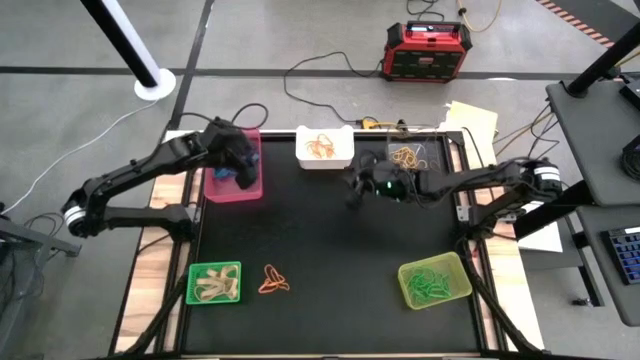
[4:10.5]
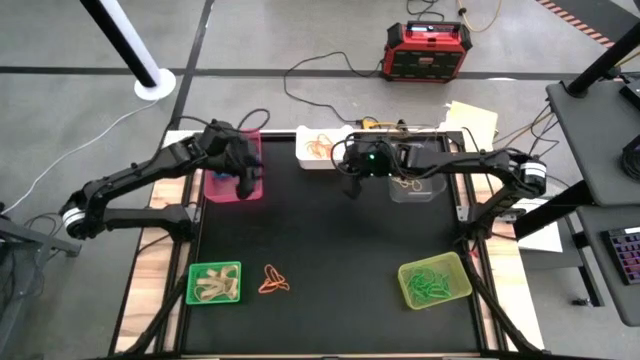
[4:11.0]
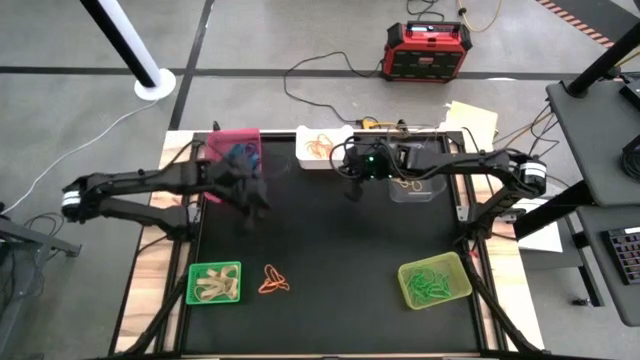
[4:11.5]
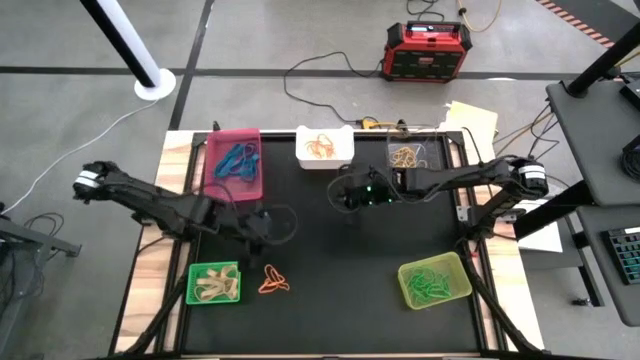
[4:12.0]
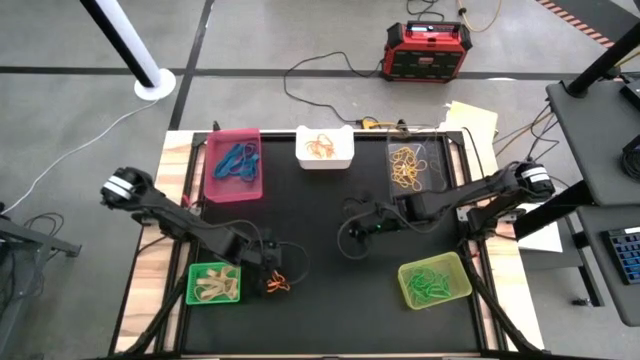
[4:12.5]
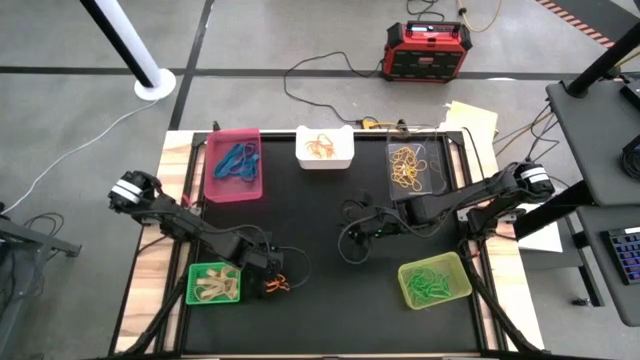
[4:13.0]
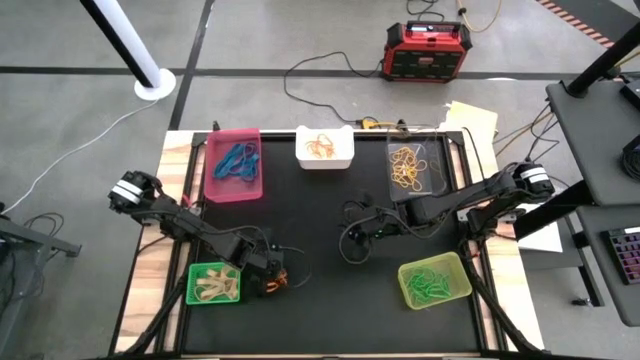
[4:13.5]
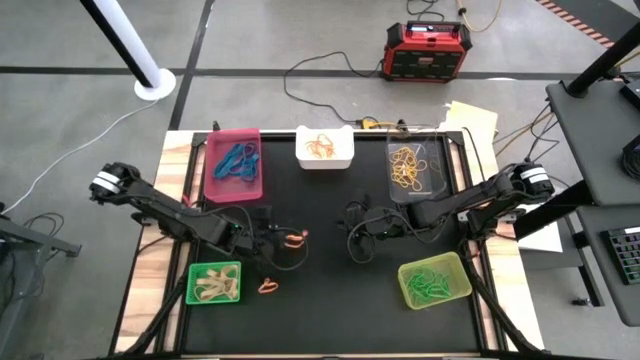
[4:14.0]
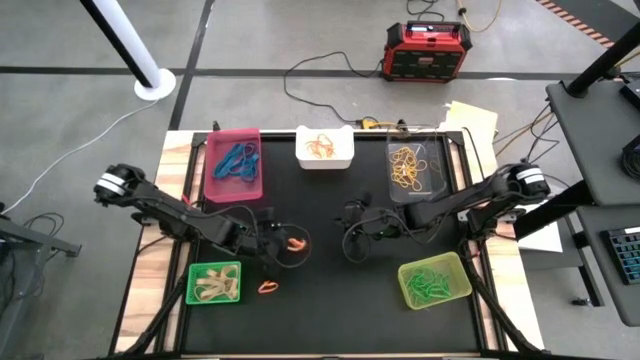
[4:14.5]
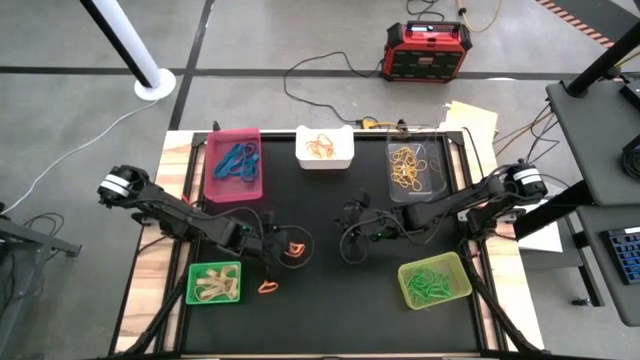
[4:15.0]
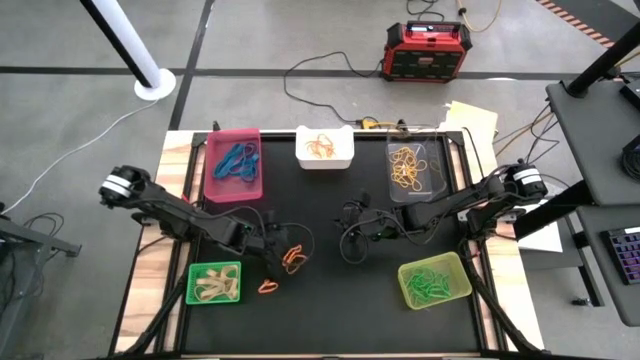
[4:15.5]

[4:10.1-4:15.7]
Task: Sort rubber bands into baskets
Put the orange rubber band into the white bin

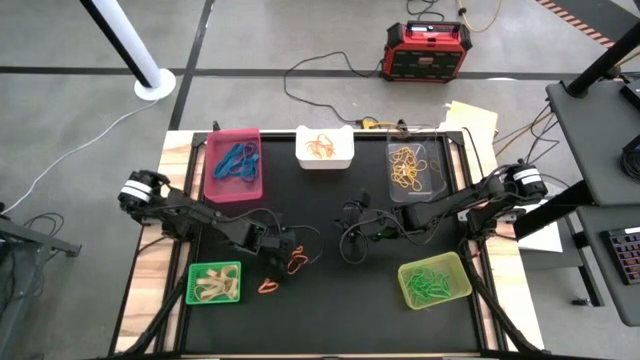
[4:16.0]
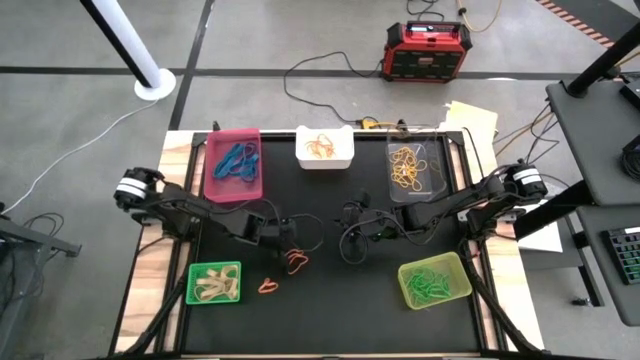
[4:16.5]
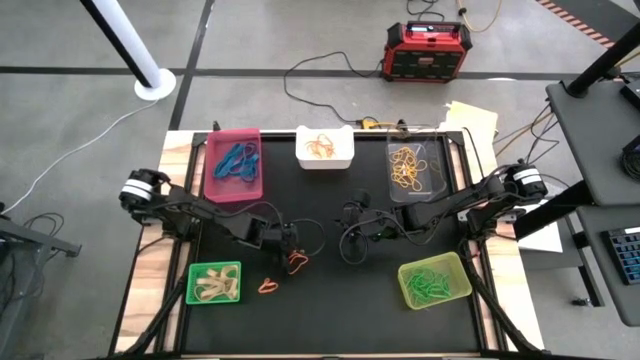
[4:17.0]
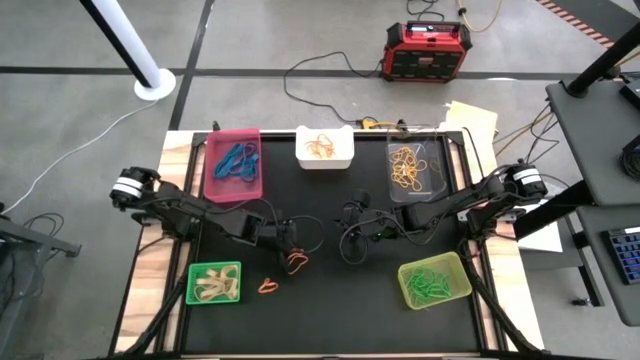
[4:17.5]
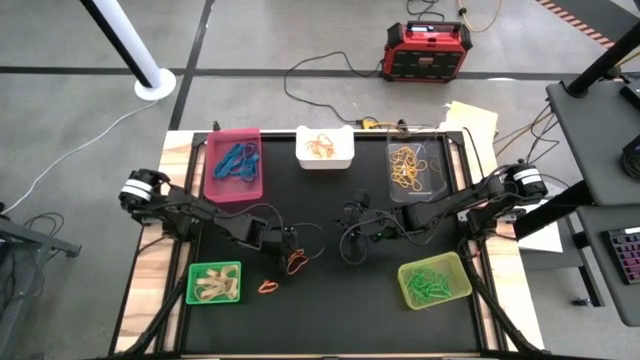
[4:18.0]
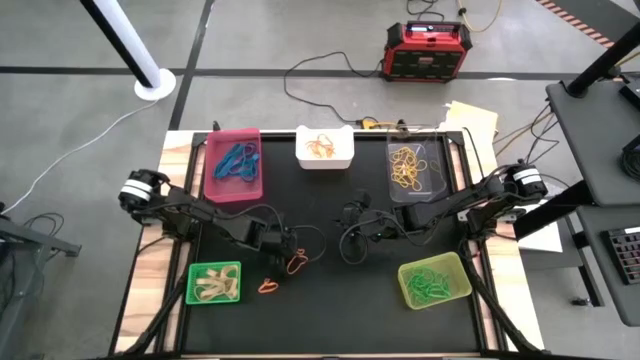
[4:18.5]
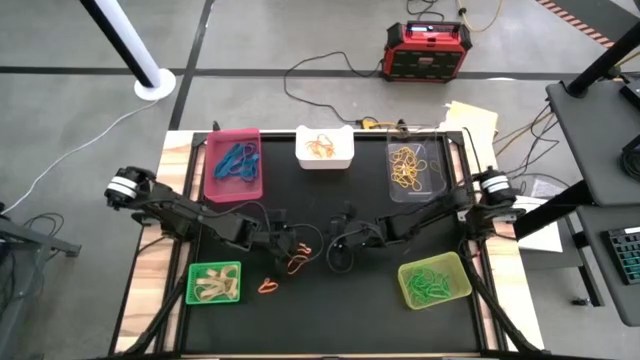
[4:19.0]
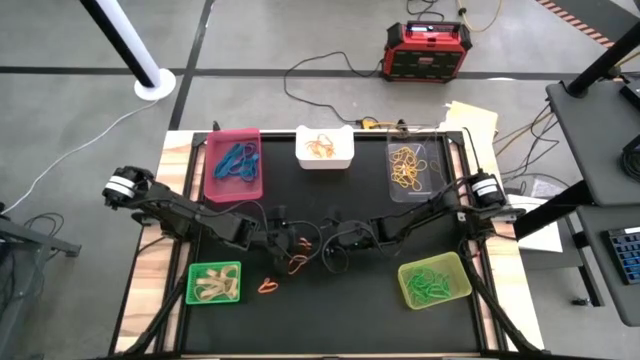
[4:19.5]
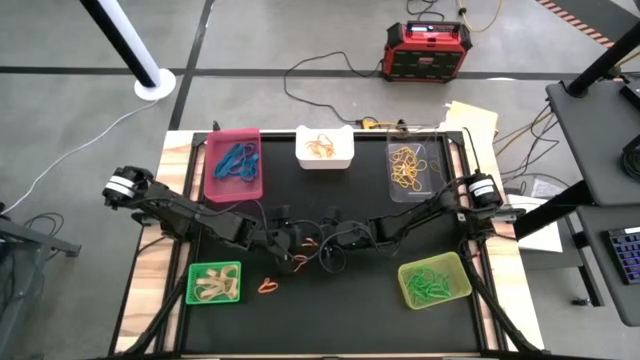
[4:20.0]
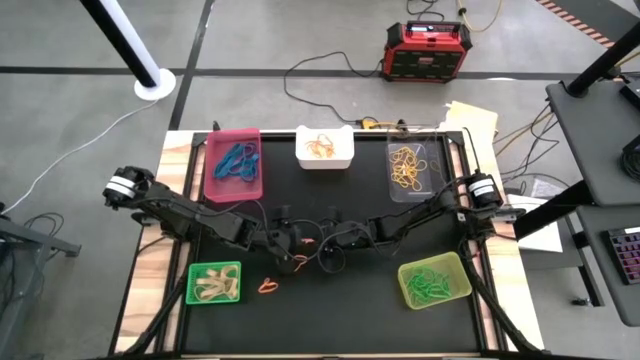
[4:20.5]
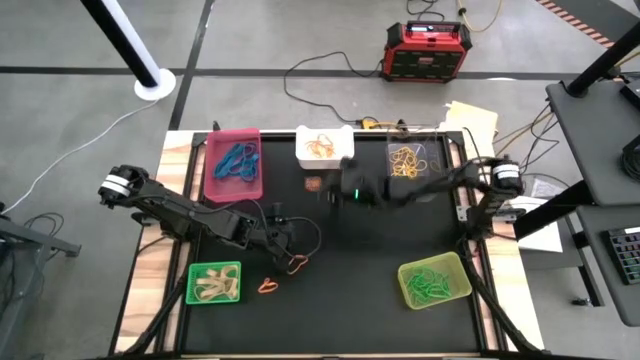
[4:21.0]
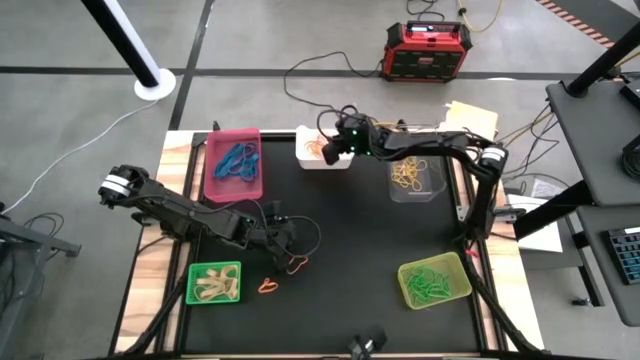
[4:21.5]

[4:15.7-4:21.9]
Put the orange rubber band into the white bin

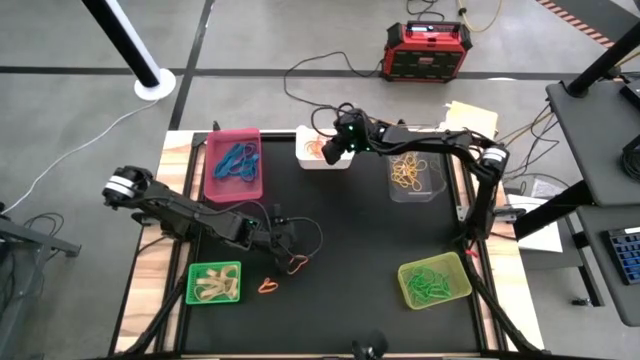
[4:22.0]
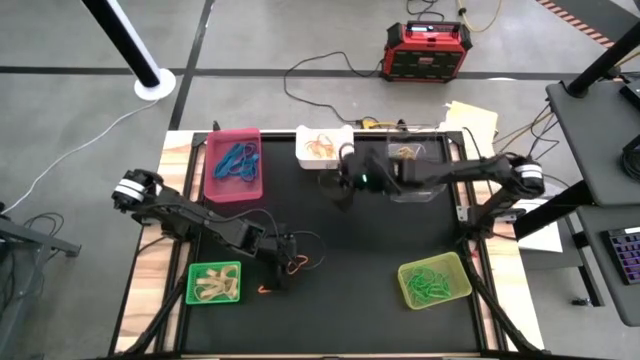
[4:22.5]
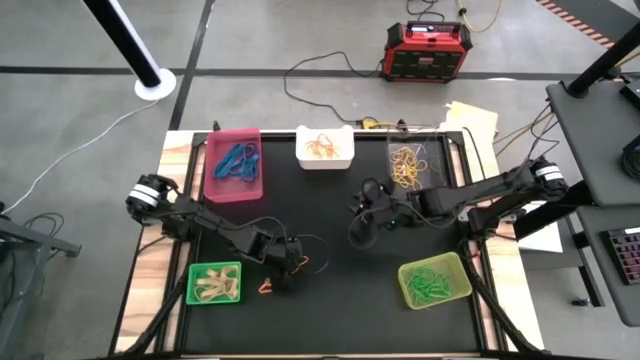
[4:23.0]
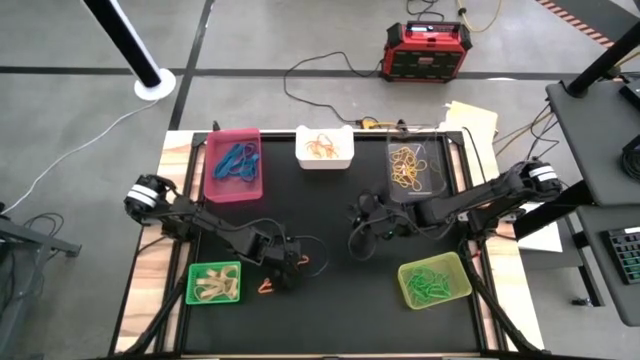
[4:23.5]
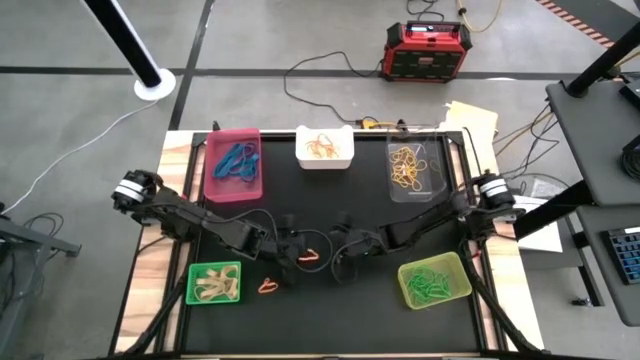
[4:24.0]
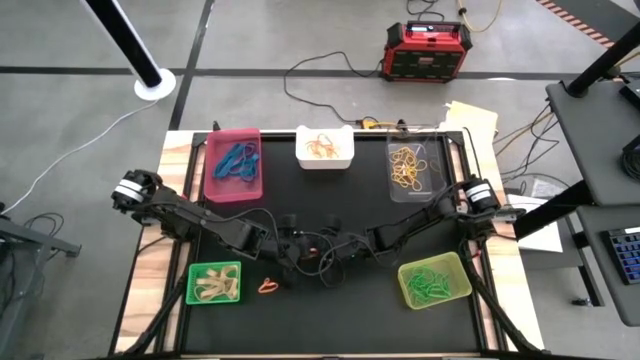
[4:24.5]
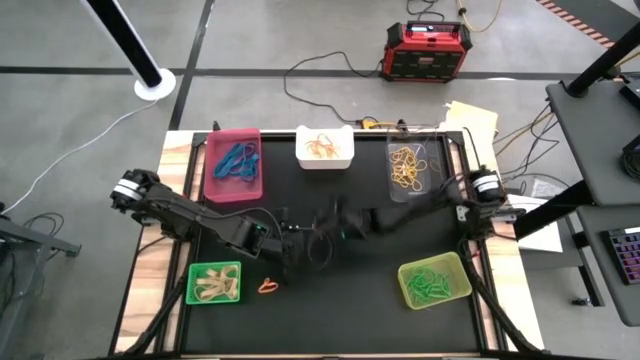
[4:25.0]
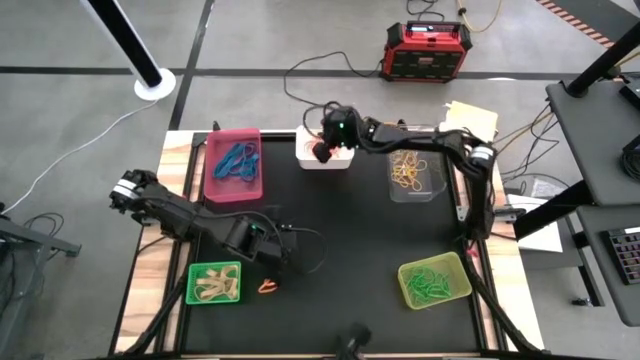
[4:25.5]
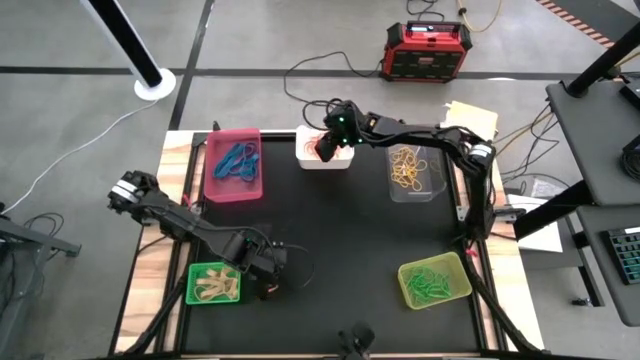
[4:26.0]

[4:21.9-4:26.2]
Put the orange rubber band into the white bin

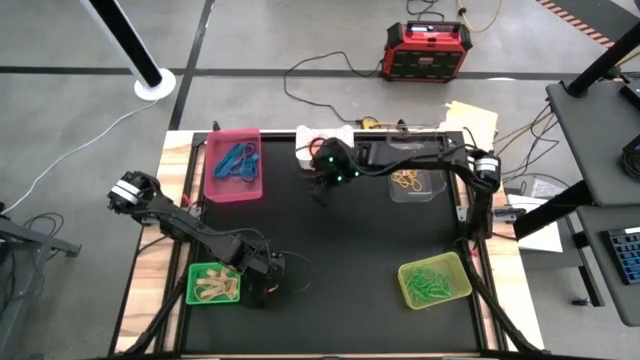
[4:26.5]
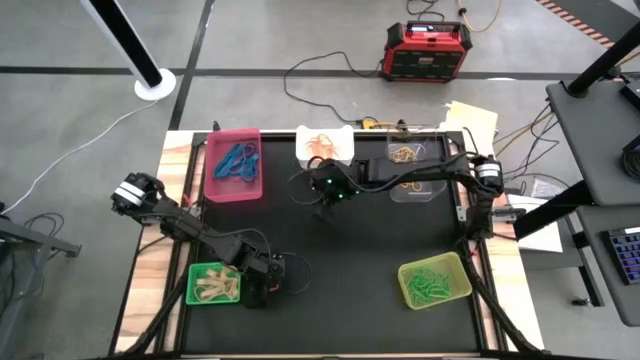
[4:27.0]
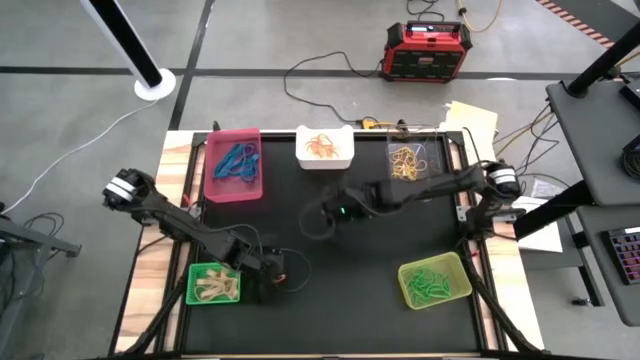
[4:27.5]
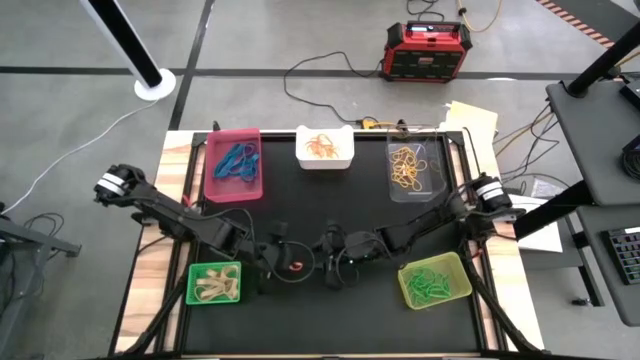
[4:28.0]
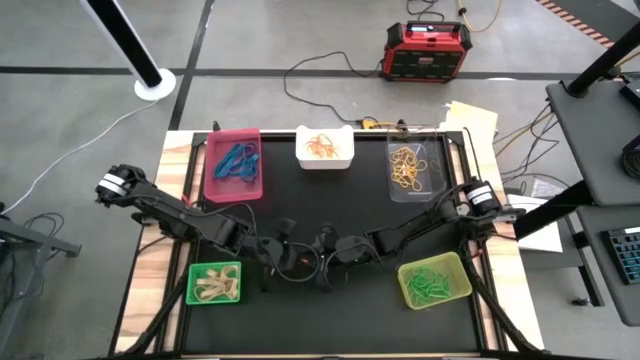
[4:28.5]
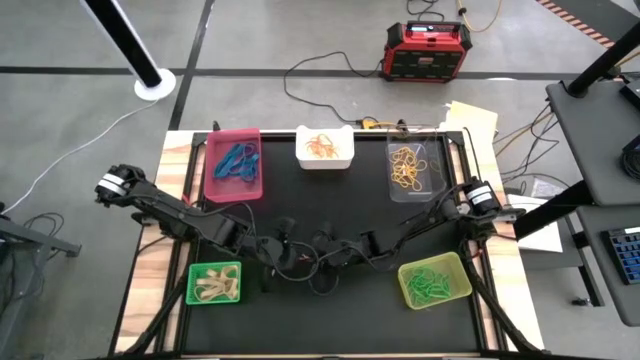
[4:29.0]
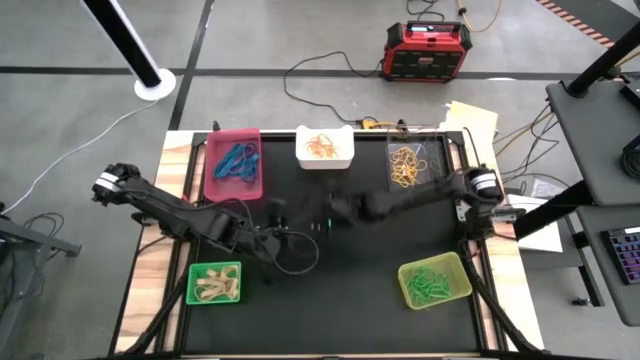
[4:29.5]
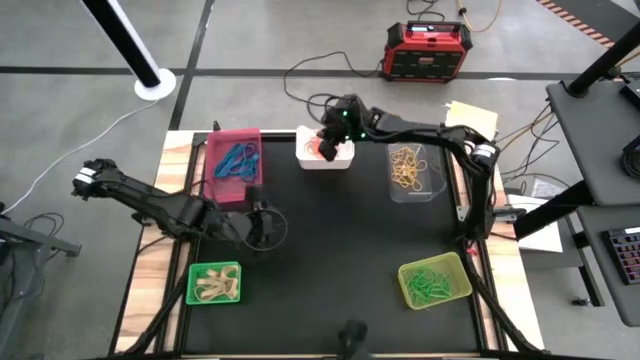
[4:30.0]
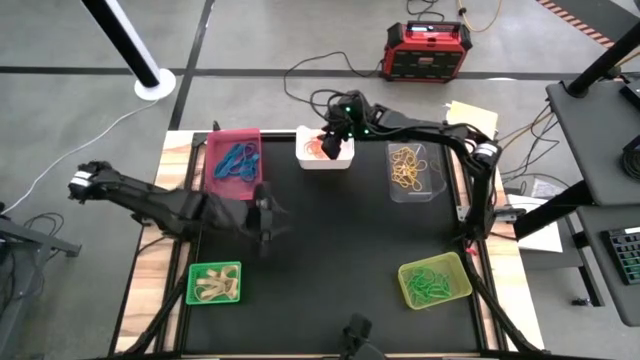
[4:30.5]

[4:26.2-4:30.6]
Put the orange rubber band into the white bin

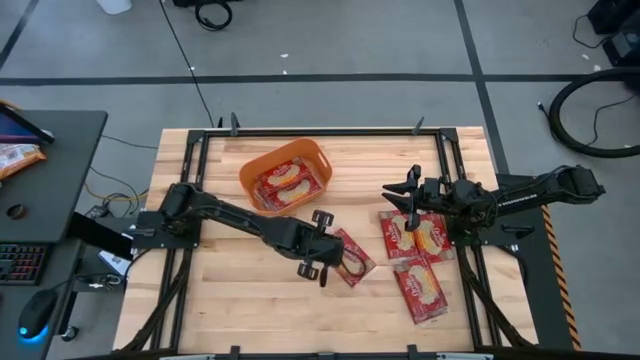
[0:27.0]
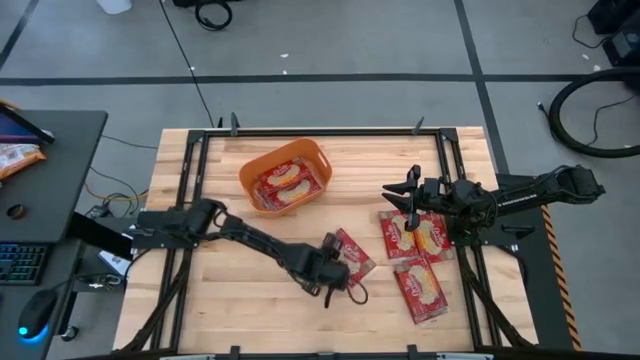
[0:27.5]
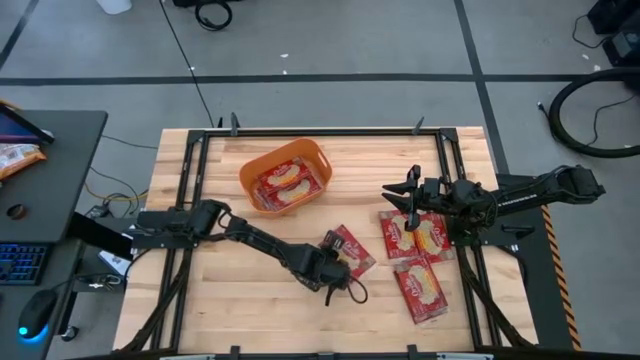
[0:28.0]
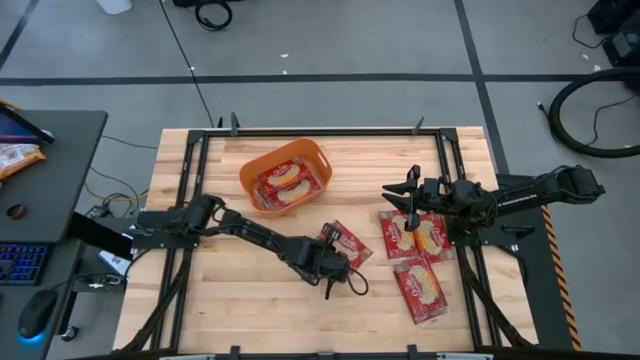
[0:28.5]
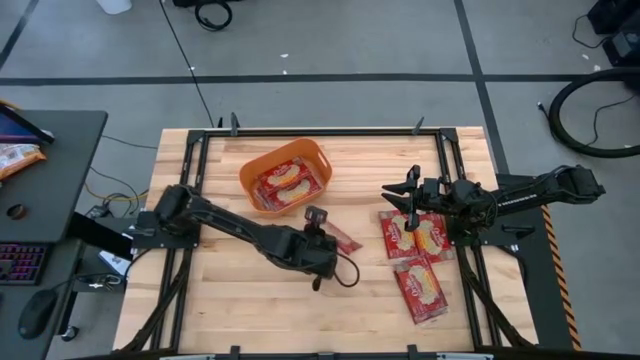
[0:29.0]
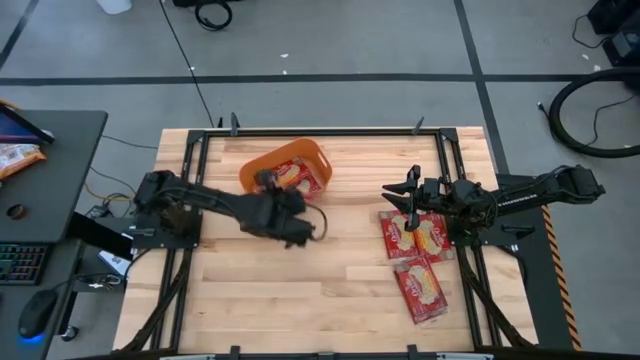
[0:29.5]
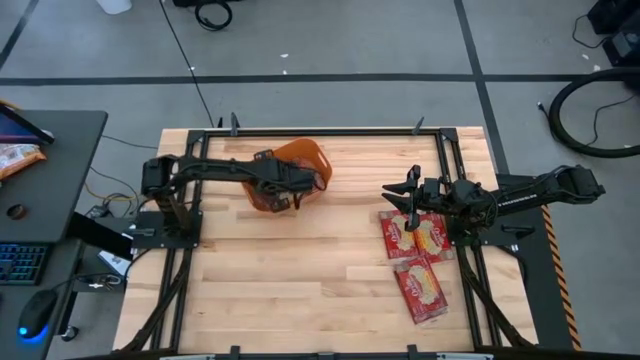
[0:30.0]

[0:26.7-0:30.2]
Task: Sort popcorn bags into baskets
Put the red popcorn bag into the orange bin
